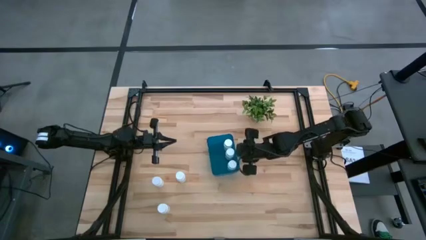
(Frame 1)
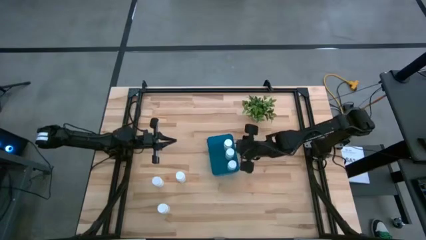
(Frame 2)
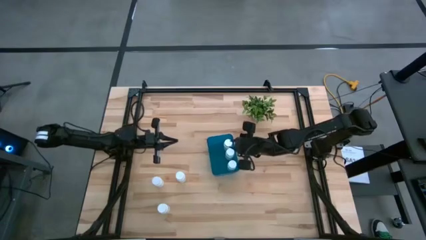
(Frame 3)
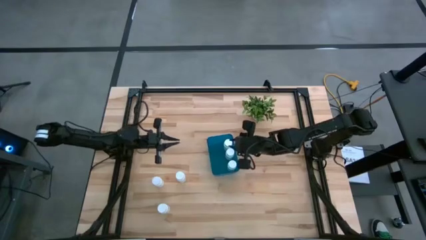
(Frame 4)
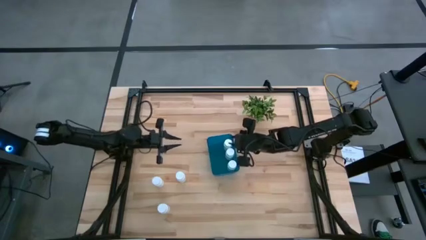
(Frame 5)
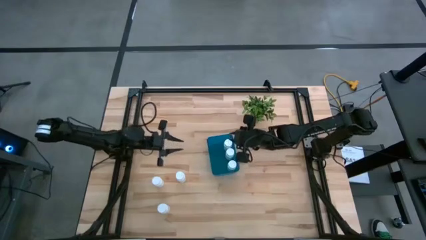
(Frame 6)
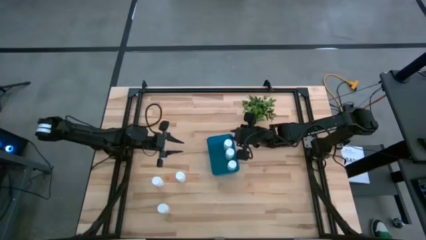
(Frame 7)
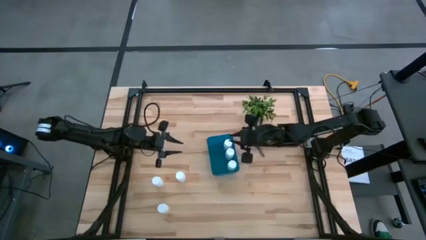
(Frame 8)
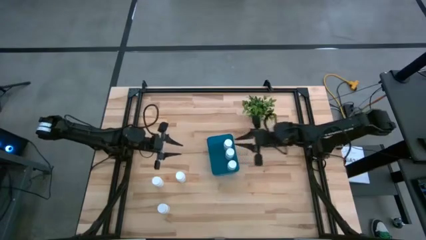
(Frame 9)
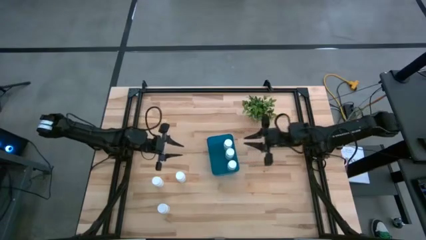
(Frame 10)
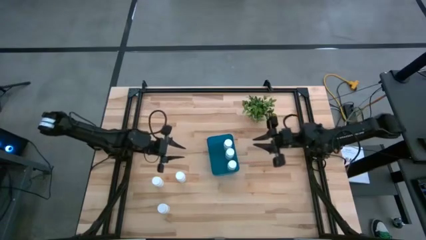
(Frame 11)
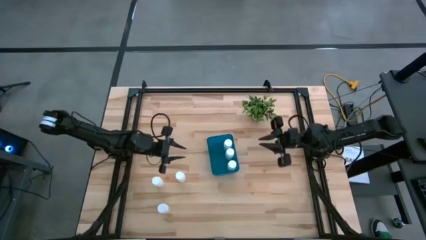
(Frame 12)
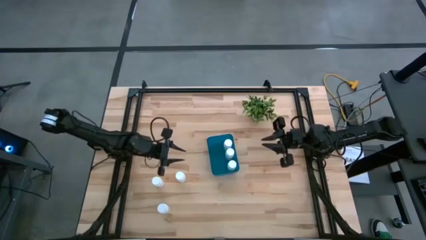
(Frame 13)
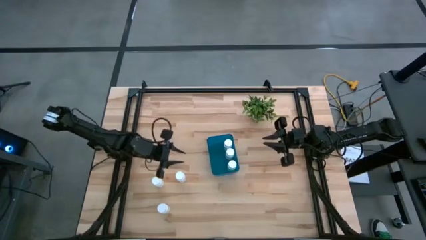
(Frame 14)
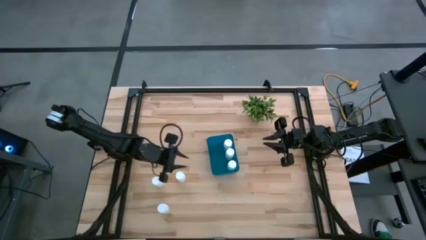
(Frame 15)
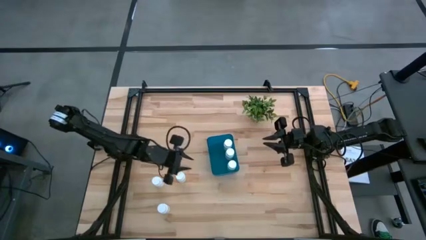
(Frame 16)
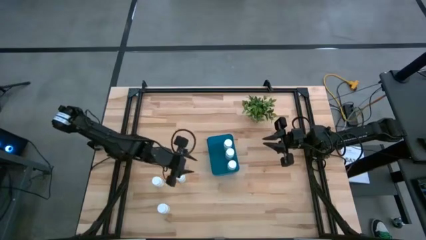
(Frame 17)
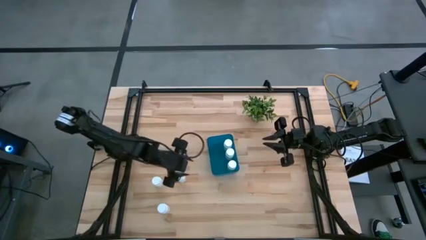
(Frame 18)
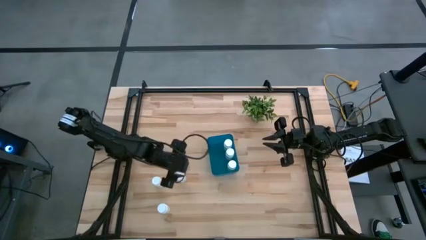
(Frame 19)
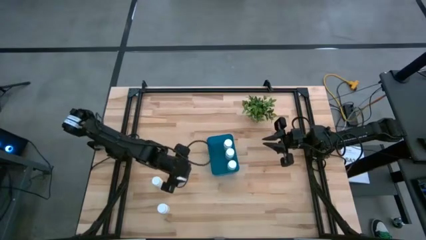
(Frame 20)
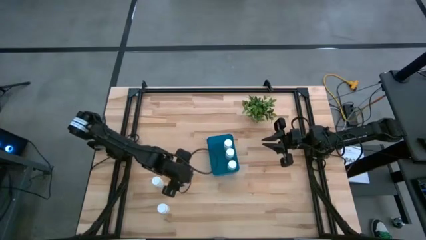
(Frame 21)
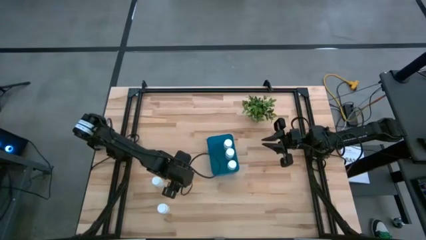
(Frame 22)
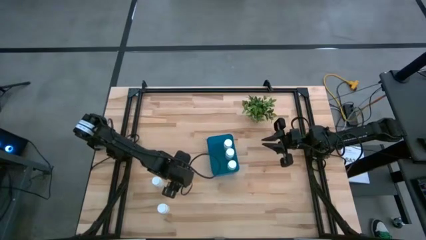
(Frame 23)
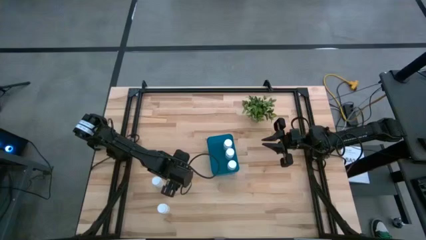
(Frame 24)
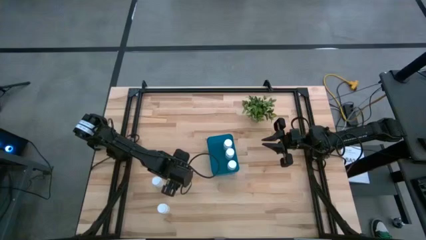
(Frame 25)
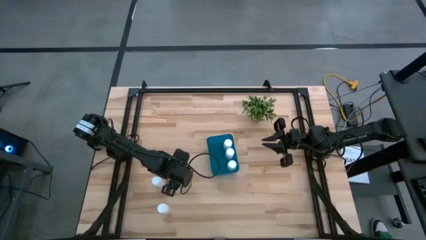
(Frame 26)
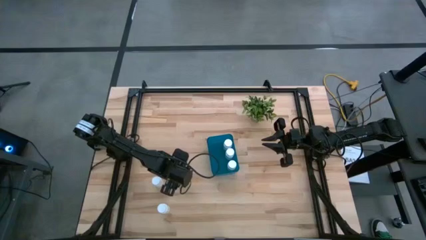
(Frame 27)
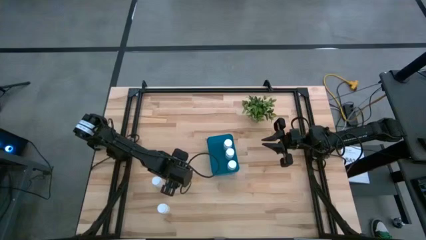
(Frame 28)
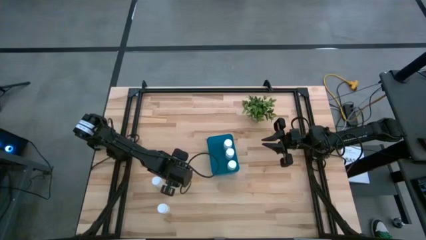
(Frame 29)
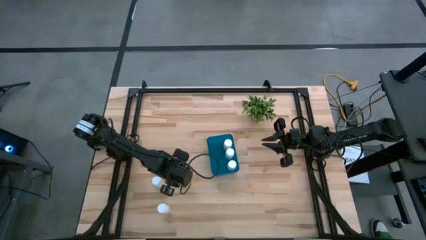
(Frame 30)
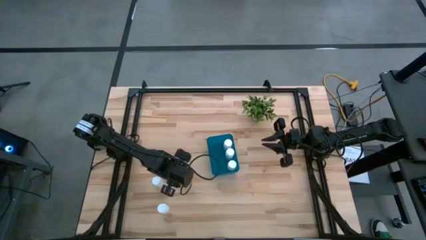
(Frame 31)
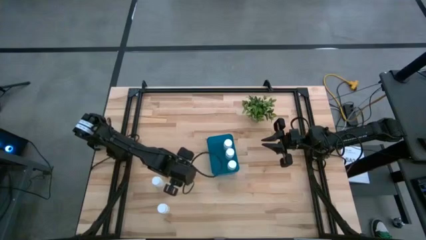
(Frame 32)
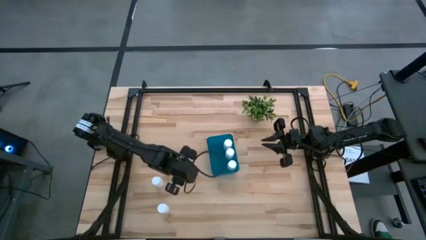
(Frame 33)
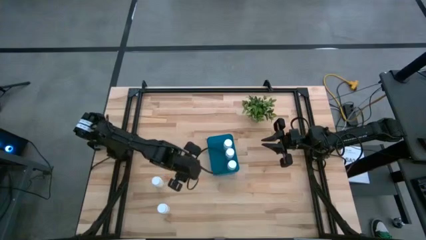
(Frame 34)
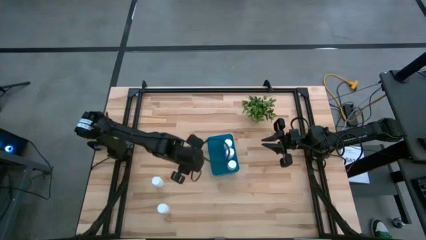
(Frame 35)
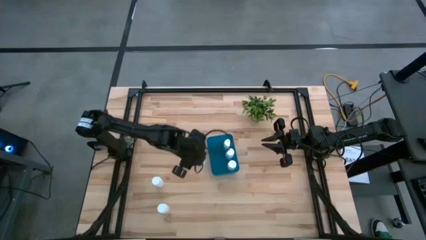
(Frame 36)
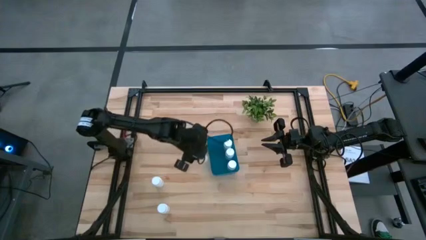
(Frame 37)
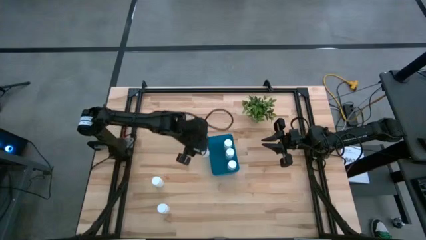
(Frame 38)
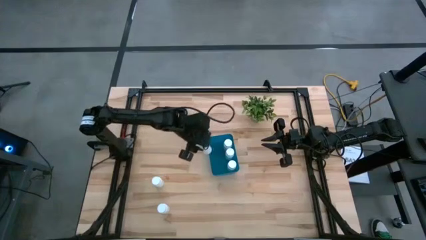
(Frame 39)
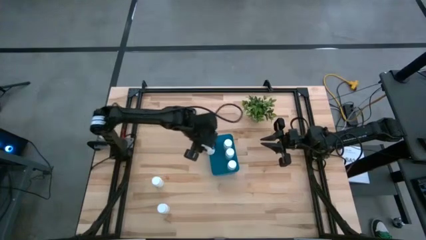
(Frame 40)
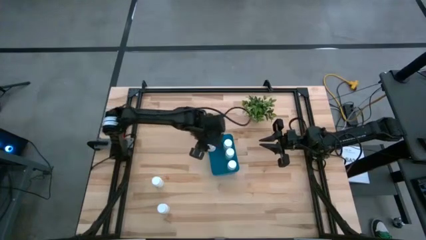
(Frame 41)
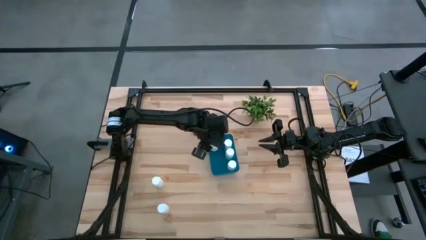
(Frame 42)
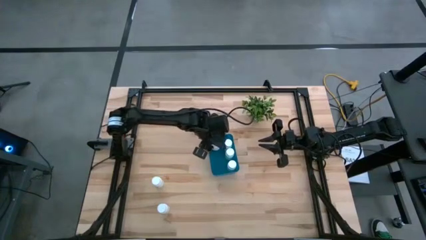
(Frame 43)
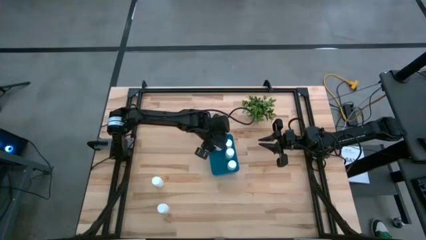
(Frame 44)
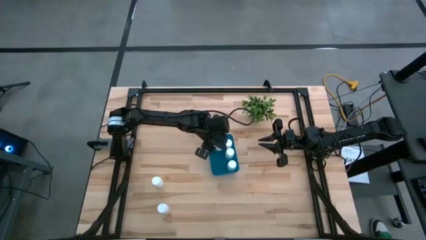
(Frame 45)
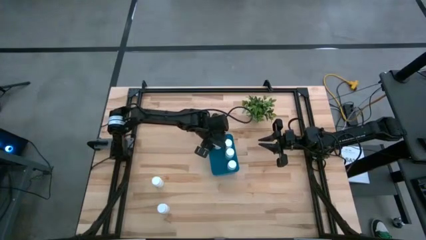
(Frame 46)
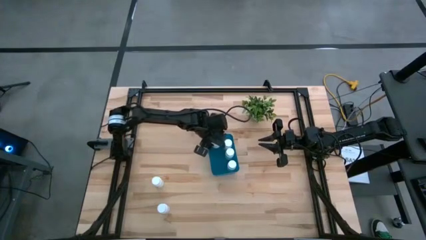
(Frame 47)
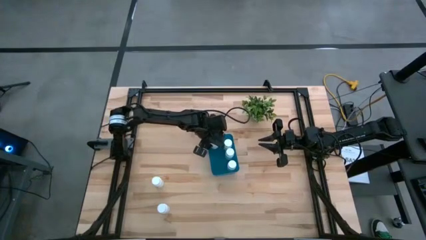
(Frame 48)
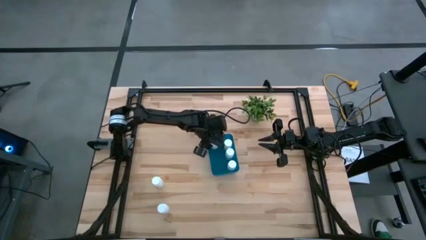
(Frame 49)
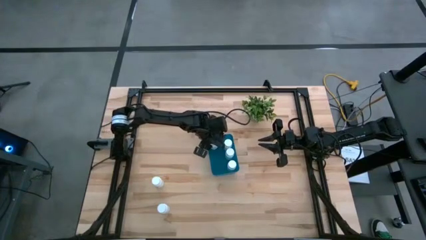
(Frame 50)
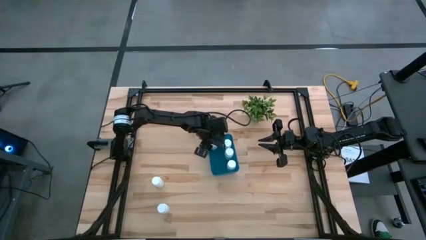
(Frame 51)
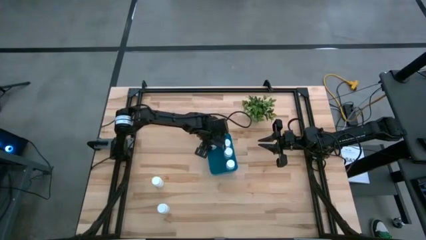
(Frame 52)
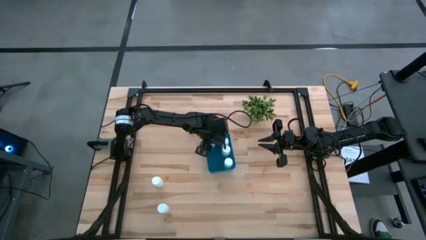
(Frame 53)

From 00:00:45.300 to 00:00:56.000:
Task: Pick and place pill bottles into a basket
Put the white pill bottle into the blue bin

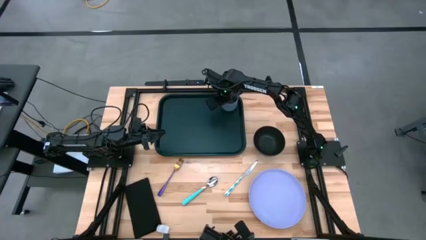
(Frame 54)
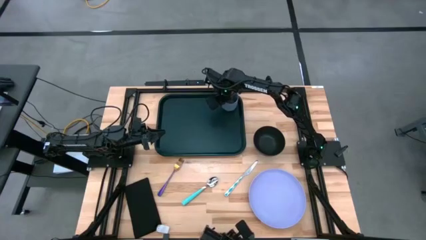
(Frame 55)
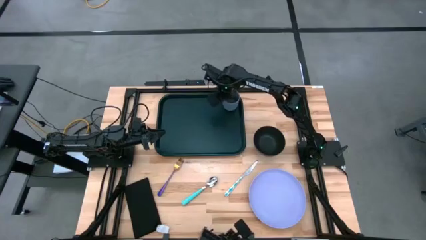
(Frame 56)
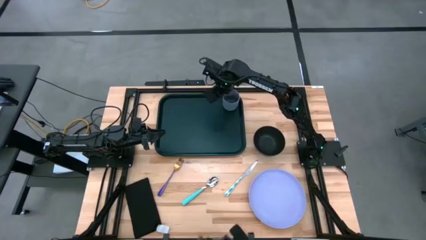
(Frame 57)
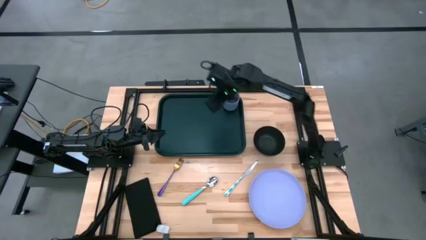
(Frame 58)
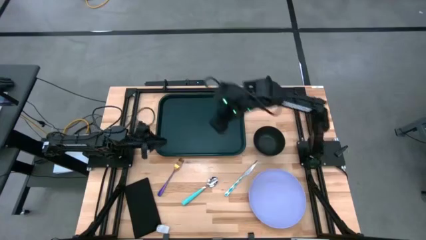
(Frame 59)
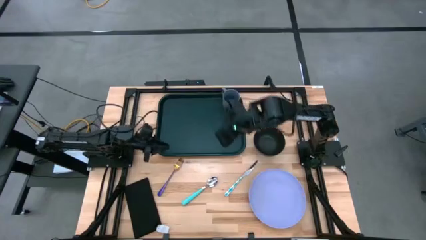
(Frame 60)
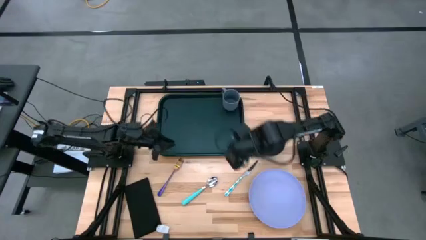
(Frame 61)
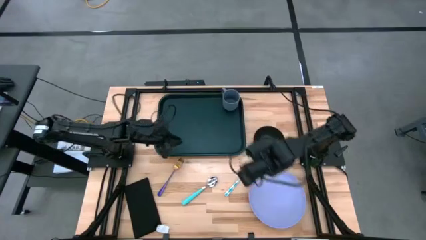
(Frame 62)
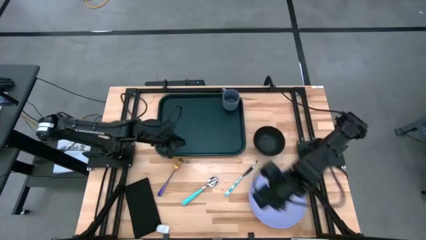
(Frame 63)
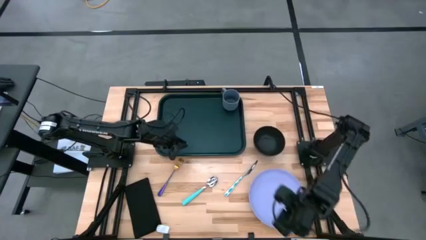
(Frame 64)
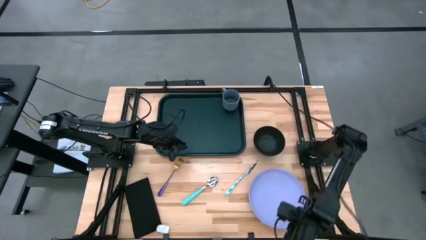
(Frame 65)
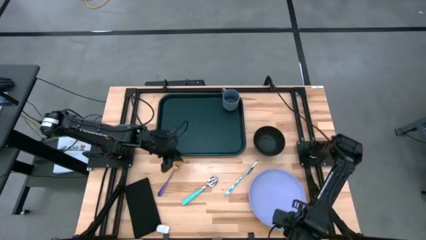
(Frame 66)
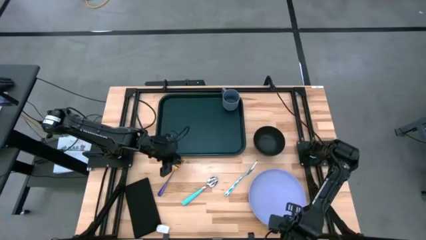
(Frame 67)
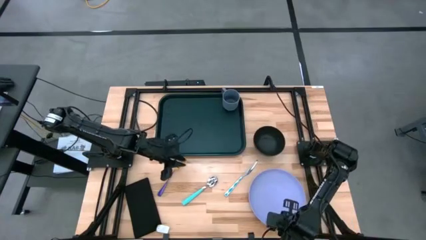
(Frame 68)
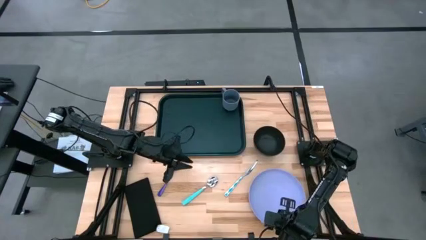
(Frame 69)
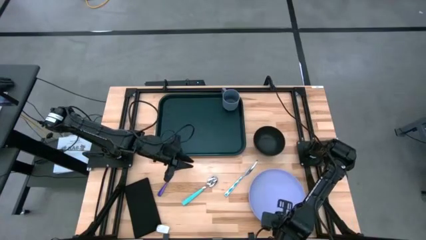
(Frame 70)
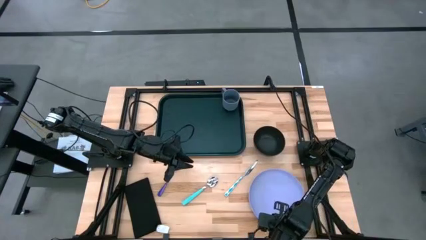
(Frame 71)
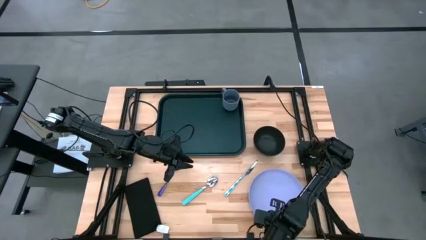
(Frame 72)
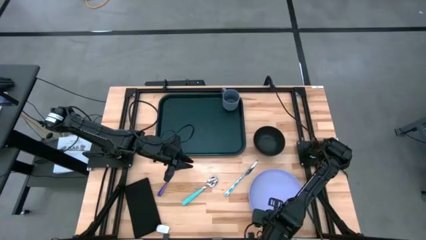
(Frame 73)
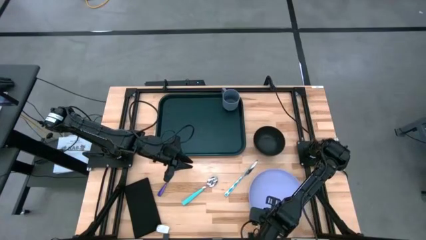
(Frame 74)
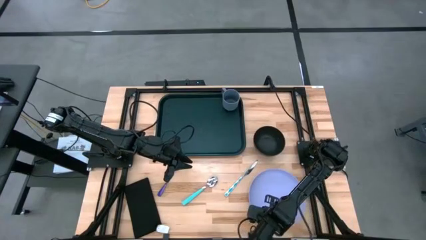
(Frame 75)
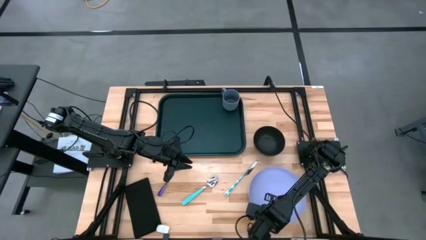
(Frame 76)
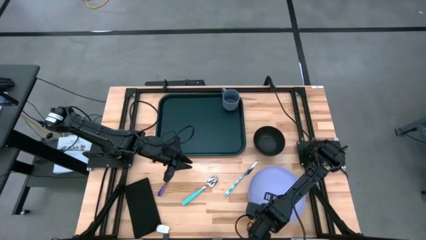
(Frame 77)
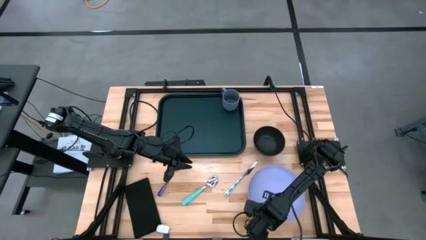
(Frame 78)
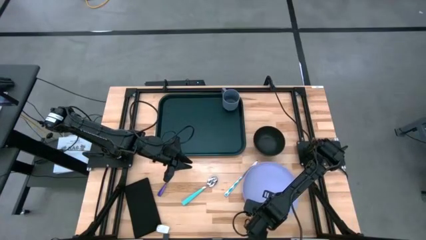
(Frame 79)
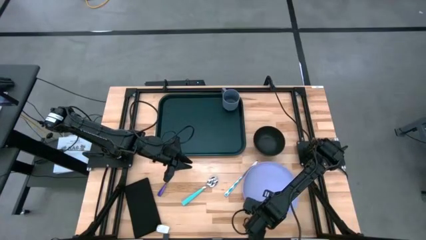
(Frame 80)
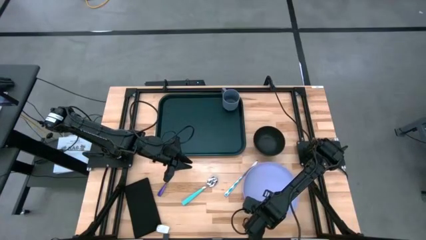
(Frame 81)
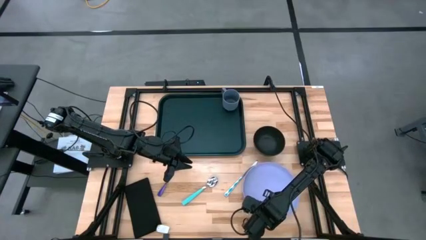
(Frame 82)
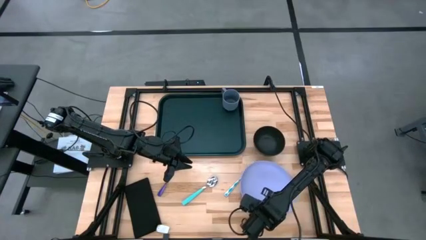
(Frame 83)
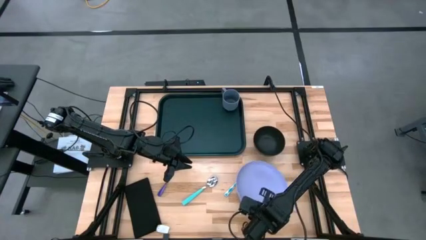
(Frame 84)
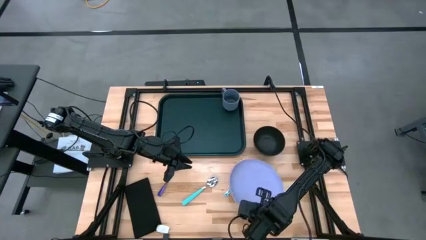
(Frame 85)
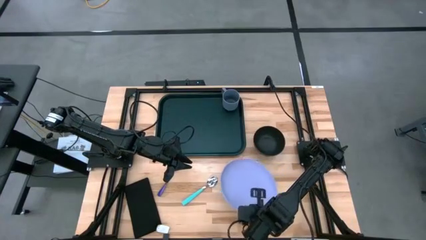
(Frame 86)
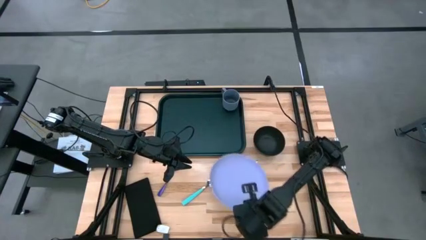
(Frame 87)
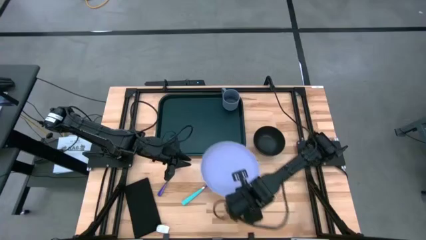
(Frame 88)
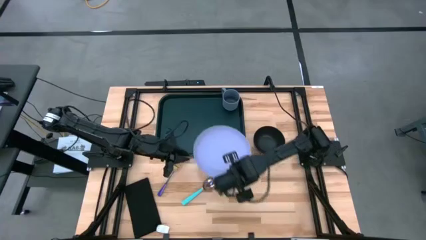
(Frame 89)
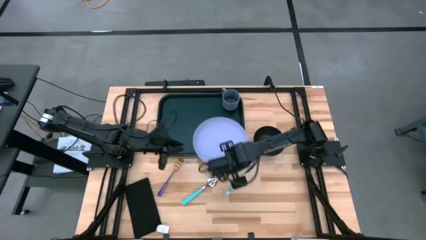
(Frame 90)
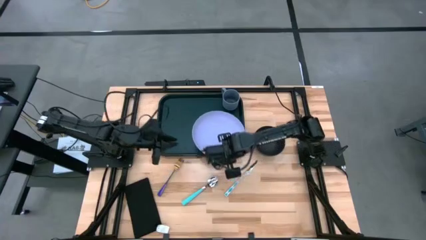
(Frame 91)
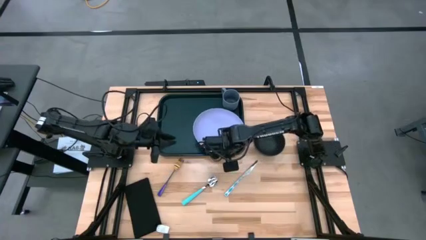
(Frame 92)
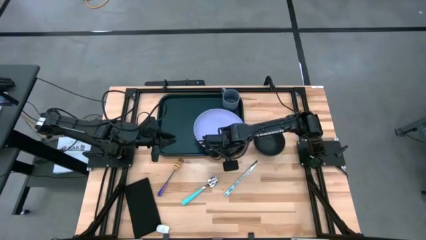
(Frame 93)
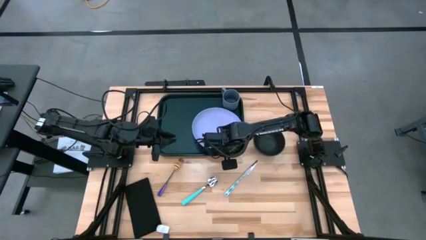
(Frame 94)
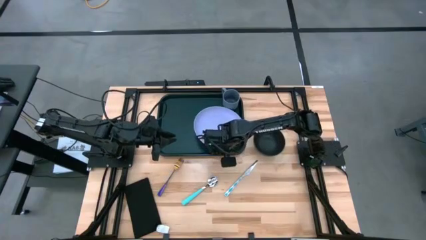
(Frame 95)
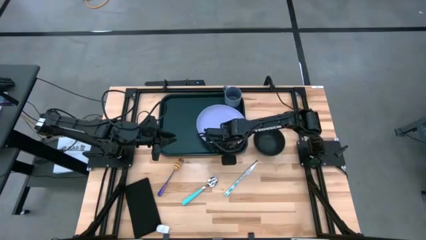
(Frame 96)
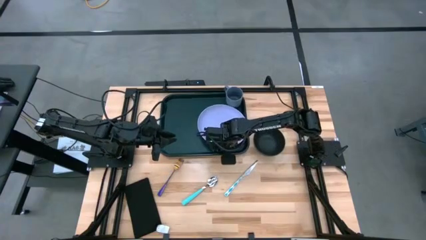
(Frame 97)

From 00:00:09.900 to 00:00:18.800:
Task: Set up tray
Put the plate on the serving tray
